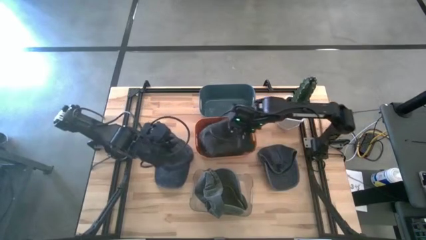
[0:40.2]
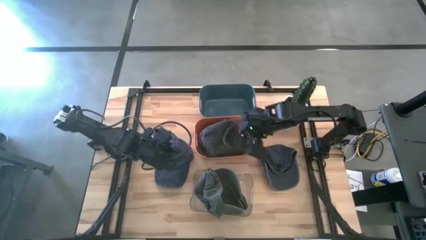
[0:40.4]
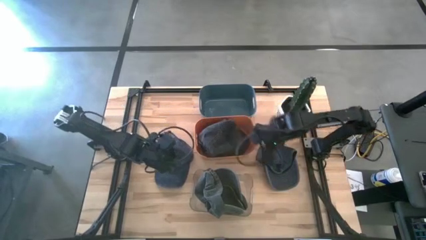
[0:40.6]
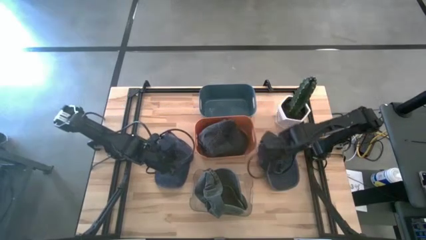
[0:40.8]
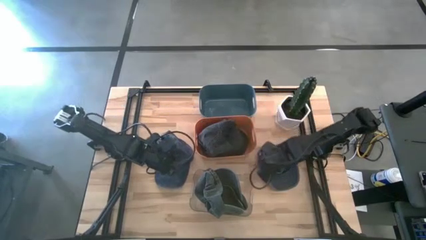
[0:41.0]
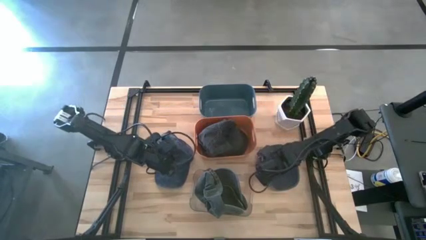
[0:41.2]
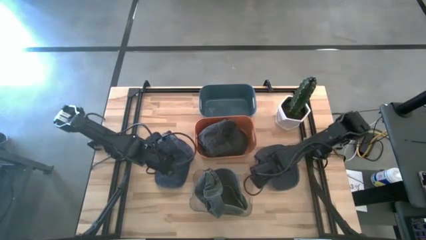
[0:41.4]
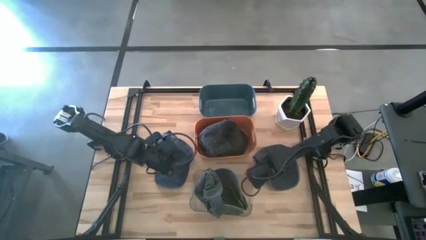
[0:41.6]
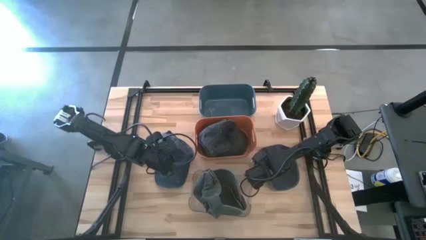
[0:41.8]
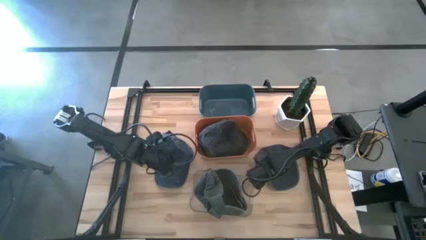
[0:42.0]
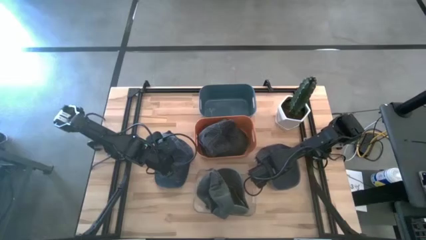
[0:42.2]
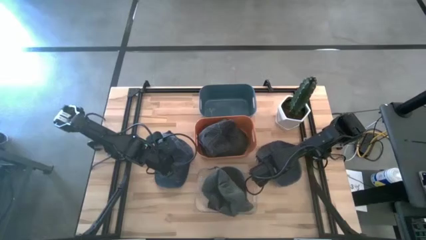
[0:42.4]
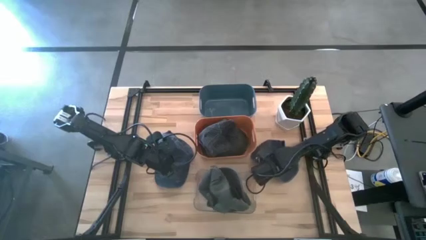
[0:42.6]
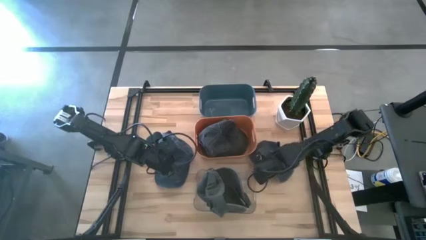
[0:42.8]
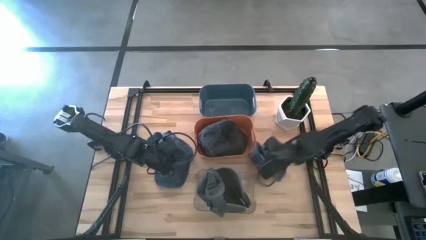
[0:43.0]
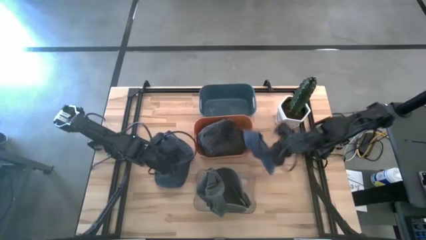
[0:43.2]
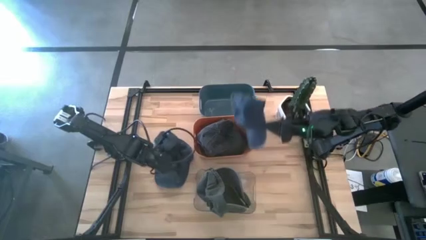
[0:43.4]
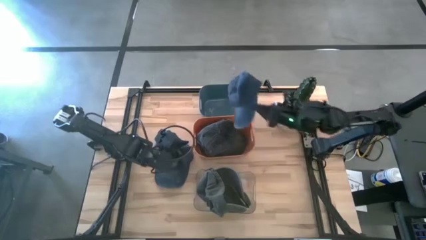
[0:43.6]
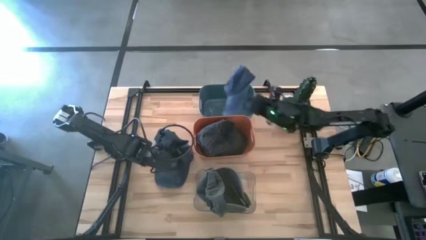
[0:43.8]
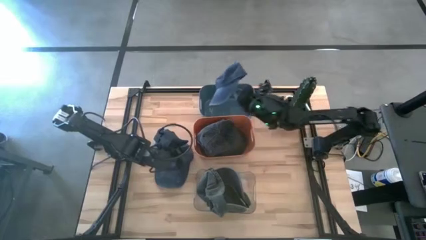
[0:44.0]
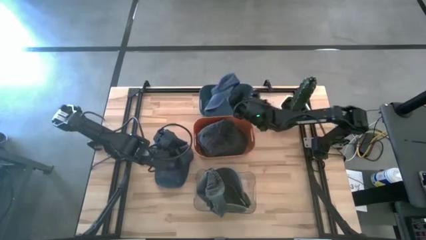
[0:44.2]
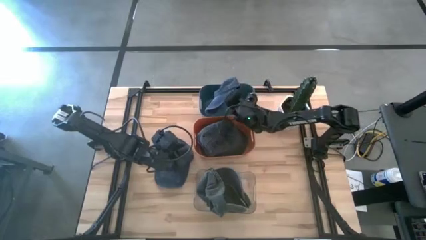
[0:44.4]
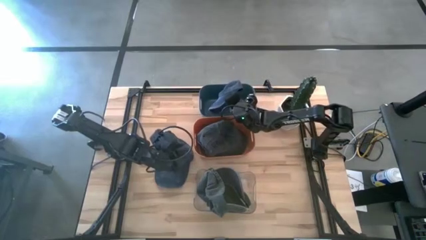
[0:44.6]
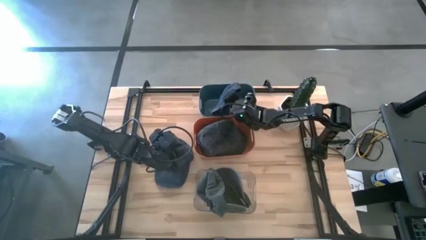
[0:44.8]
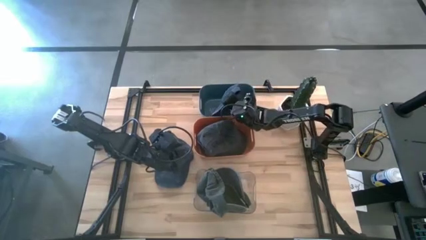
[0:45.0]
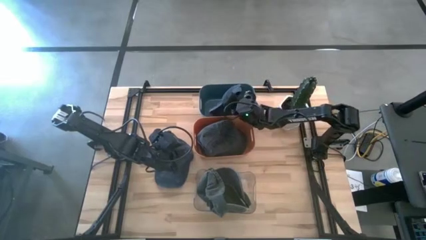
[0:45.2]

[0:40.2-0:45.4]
Task: Pick & Place hat
Put the right blue cap into the blue bin

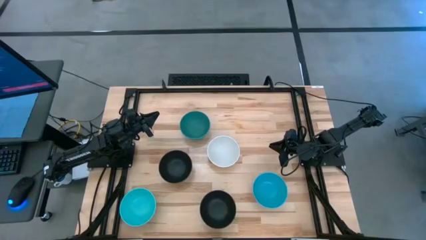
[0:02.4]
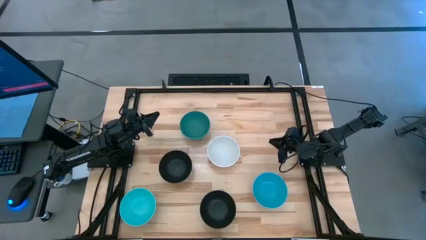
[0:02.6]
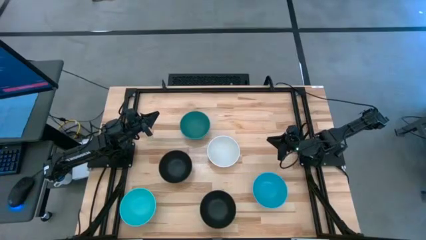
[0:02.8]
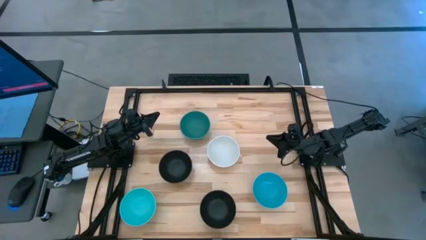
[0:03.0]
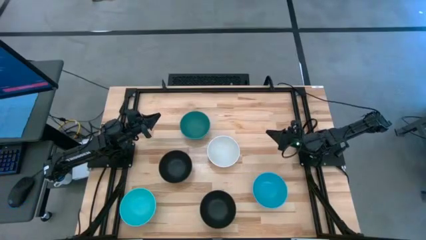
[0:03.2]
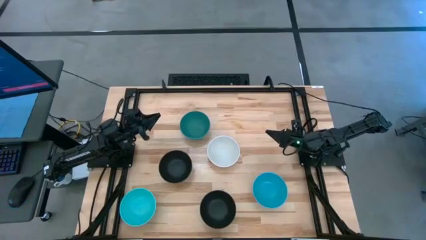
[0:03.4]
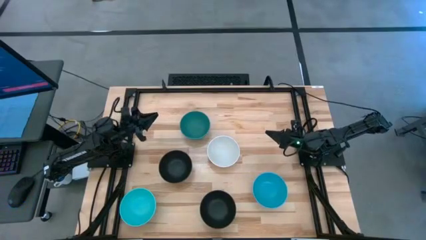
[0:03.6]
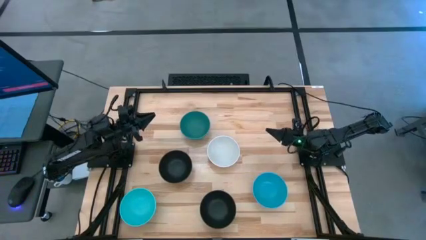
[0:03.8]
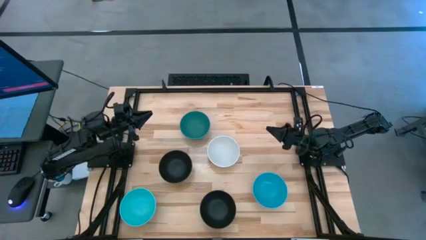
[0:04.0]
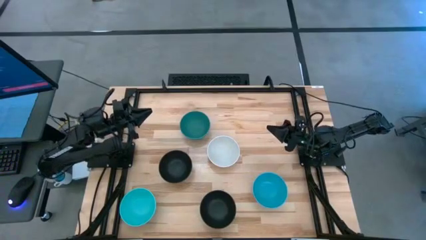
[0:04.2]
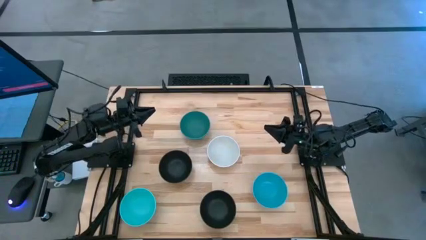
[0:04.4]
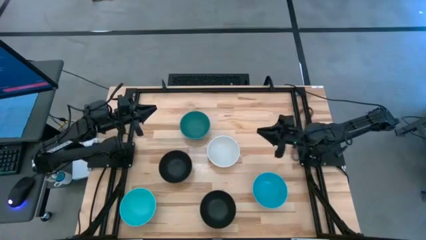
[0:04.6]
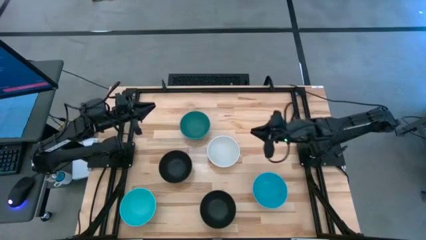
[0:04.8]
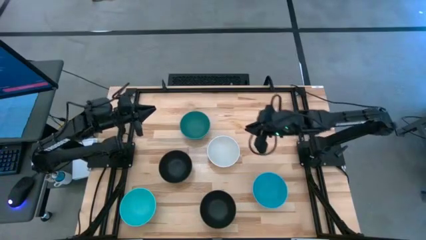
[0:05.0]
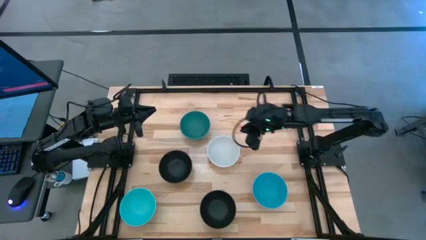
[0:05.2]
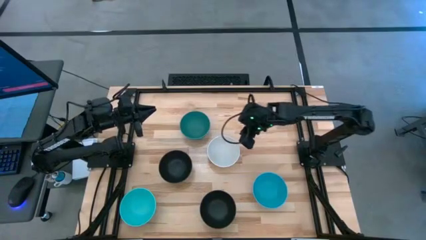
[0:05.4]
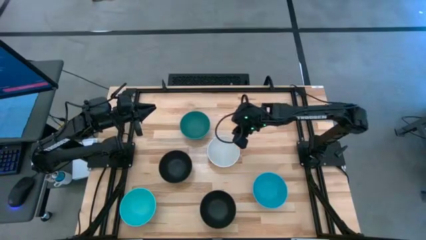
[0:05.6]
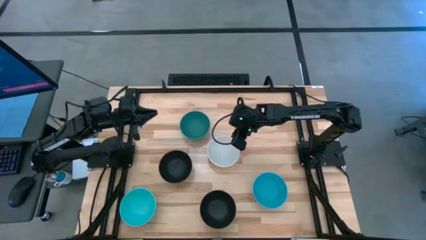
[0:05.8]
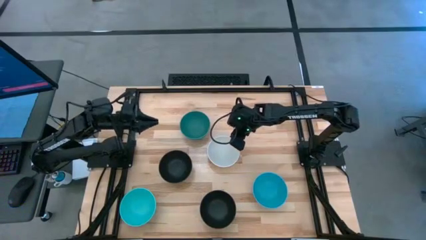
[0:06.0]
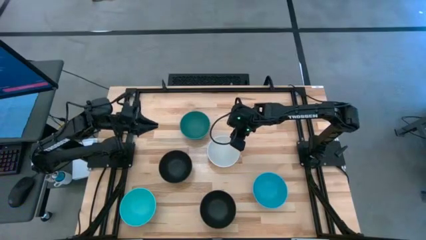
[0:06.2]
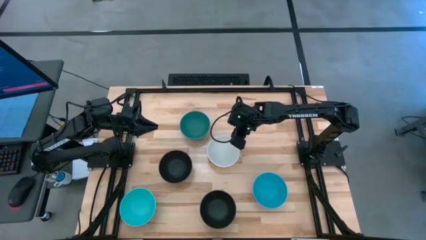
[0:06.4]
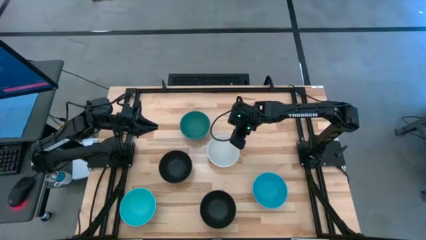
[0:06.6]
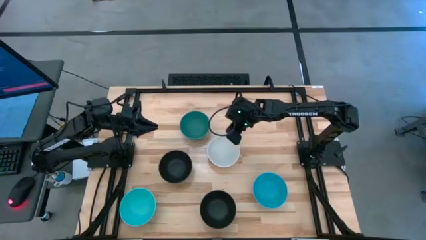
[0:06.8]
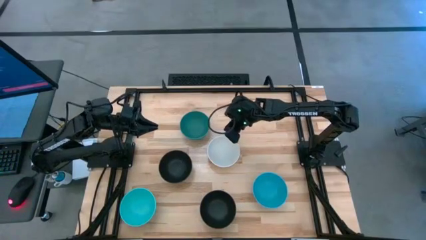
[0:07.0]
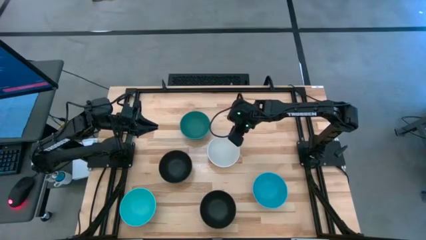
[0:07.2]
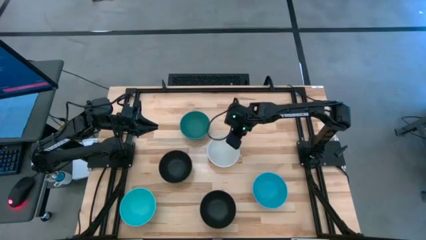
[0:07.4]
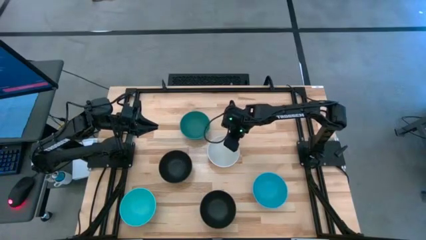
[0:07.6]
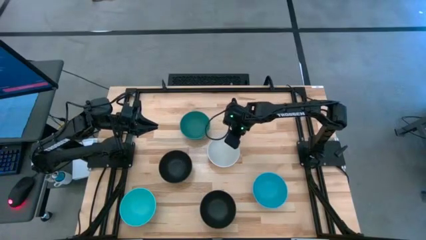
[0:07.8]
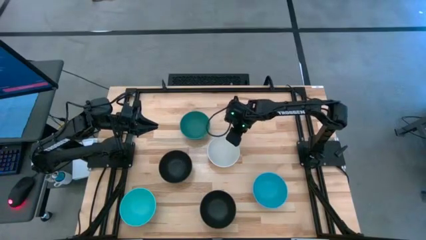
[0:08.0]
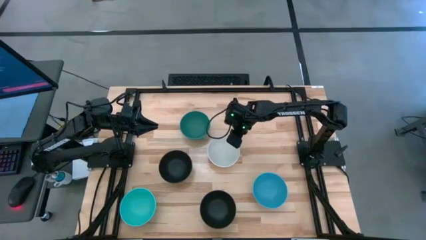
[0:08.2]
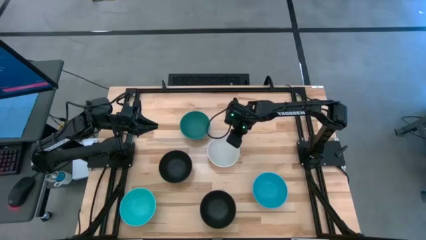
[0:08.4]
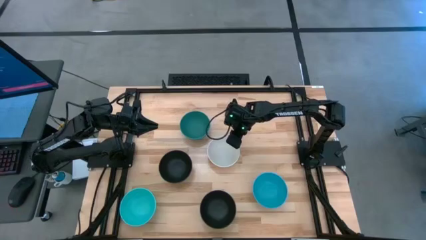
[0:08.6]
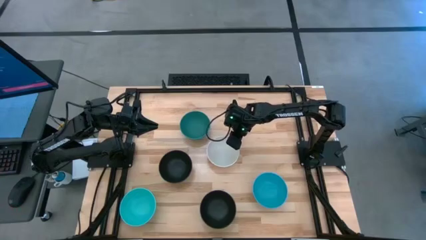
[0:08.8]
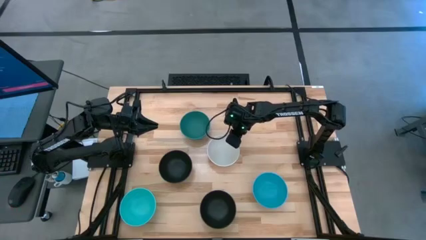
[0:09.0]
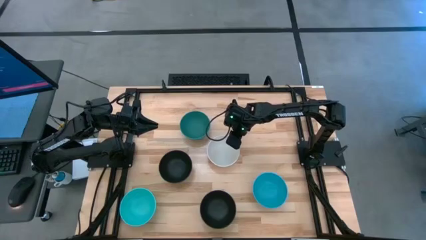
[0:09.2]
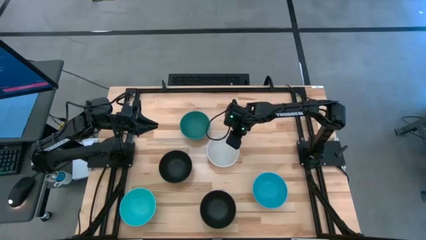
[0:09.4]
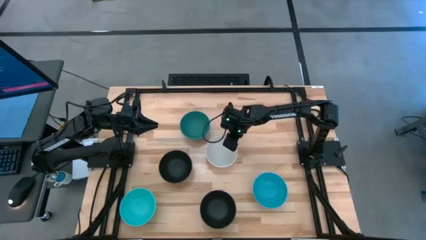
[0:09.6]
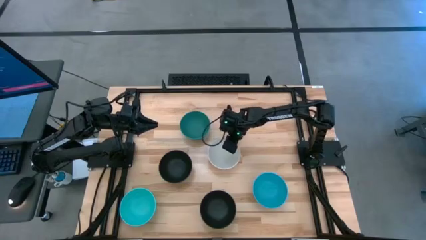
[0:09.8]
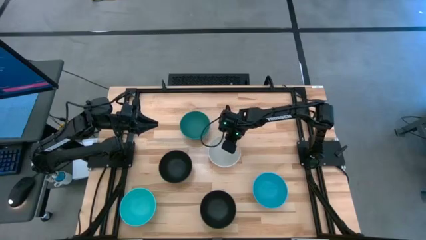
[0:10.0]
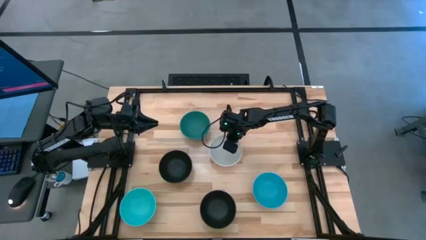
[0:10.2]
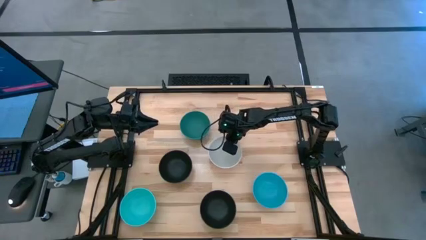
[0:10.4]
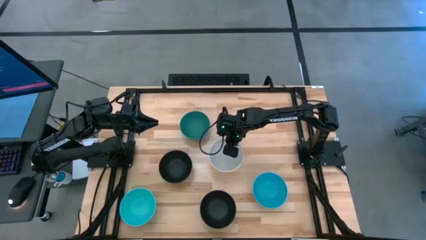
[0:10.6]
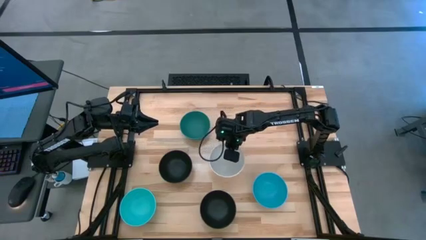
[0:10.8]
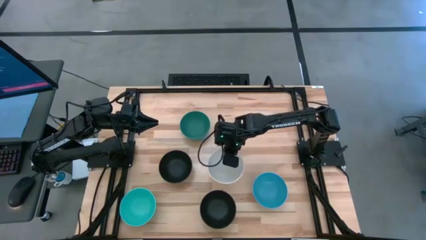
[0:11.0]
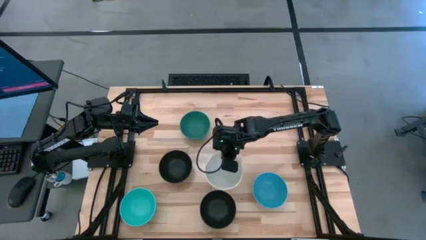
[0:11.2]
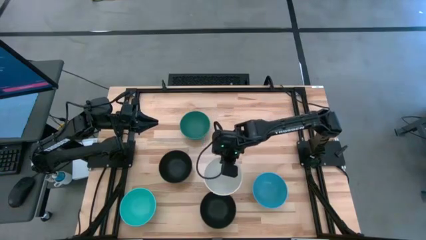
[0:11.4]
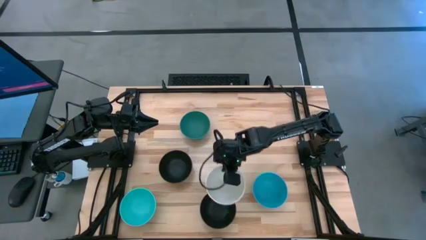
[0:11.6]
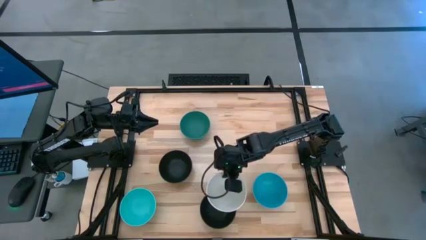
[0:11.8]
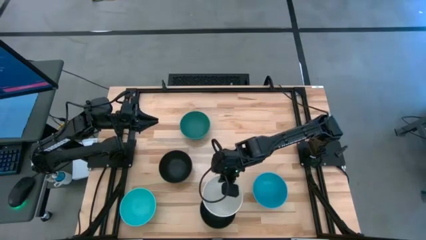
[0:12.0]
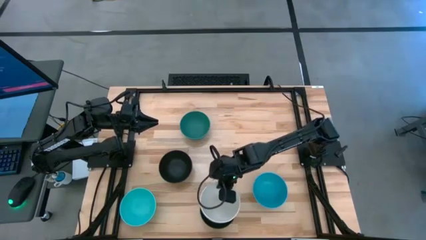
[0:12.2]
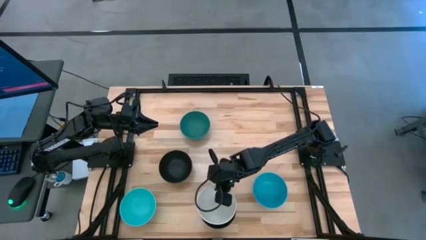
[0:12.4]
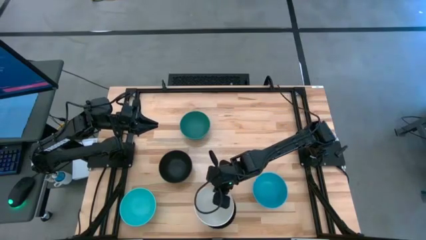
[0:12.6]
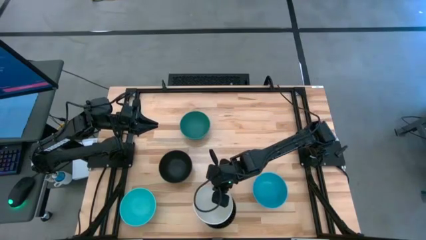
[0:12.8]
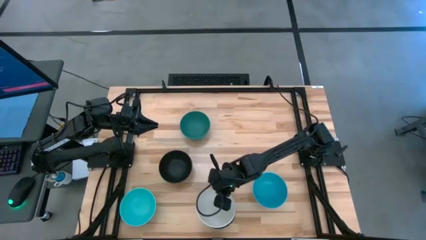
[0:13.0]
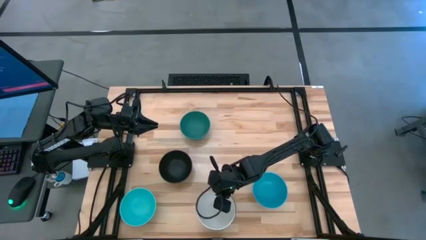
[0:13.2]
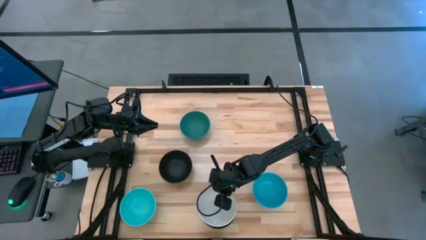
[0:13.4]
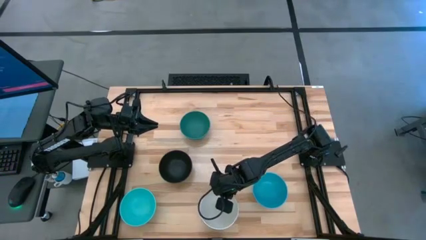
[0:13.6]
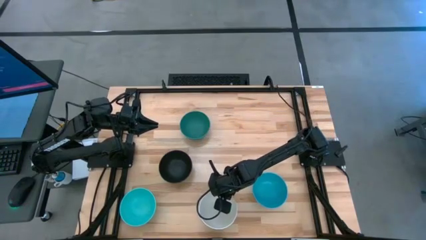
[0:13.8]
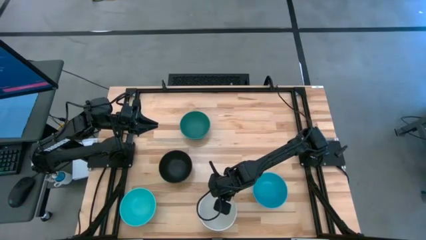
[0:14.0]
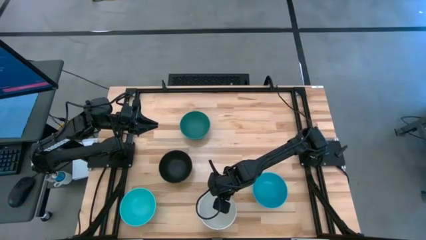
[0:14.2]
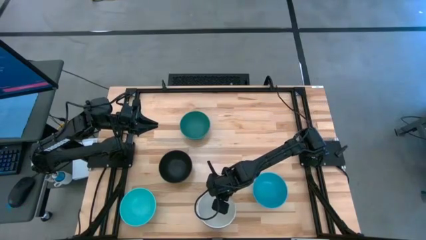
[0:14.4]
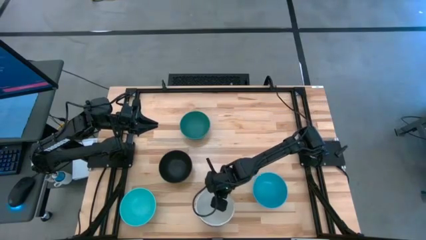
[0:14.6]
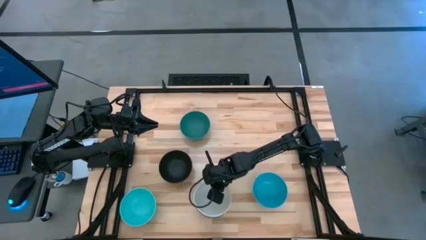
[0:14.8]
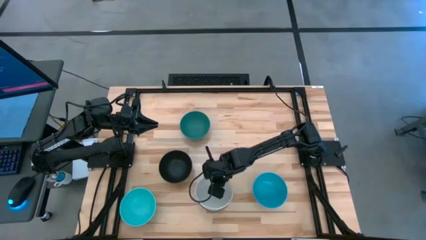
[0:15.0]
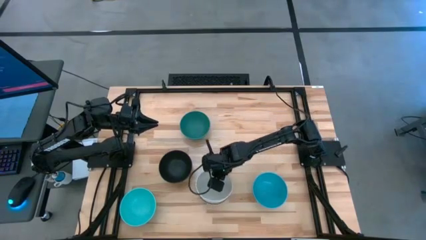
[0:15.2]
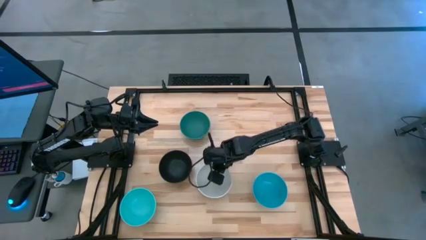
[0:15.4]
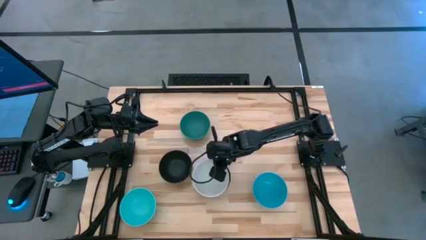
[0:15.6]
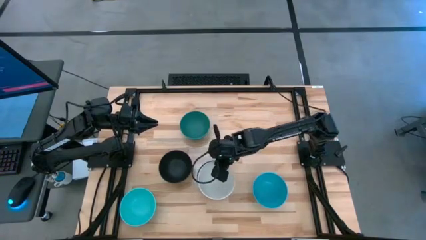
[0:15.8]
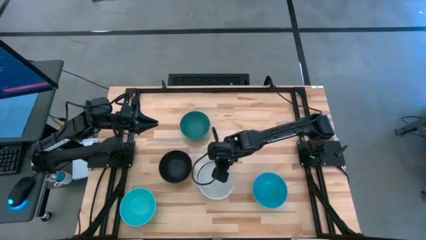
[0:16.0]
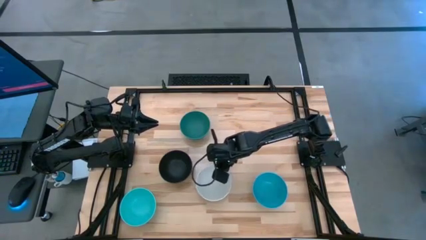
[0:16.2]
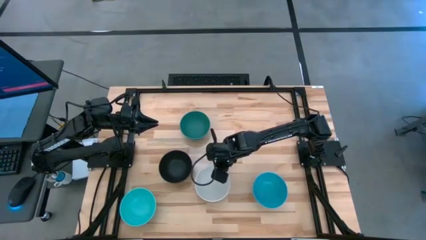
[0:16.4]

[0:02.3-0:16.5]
Task: Nest bowls inside each other
Stack the white bowl on top of the bottom black bowl
